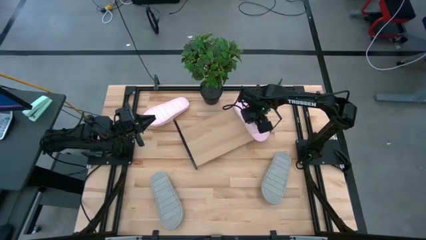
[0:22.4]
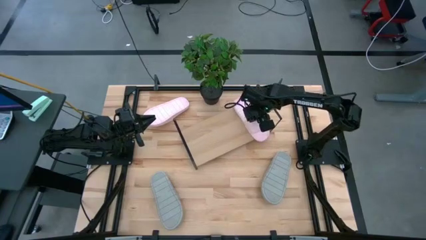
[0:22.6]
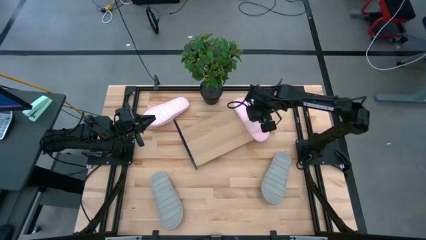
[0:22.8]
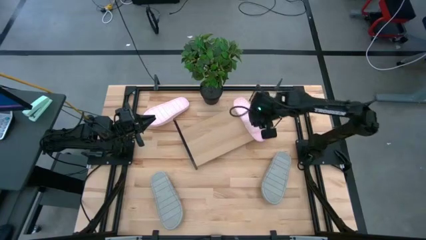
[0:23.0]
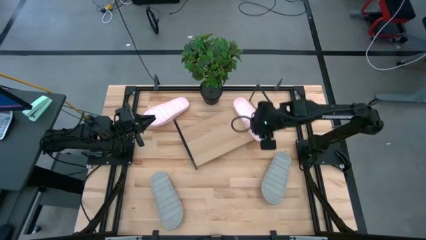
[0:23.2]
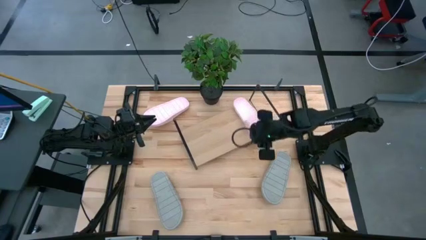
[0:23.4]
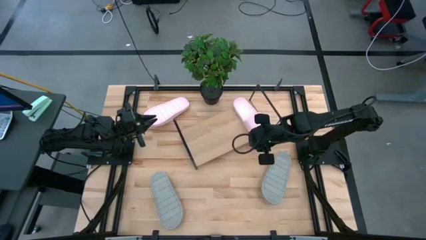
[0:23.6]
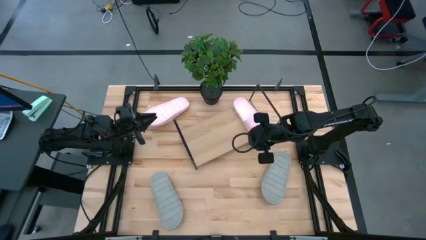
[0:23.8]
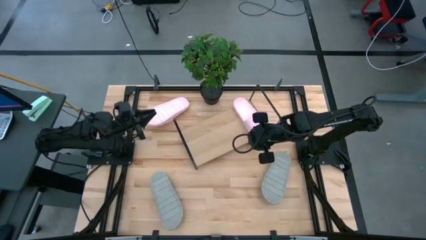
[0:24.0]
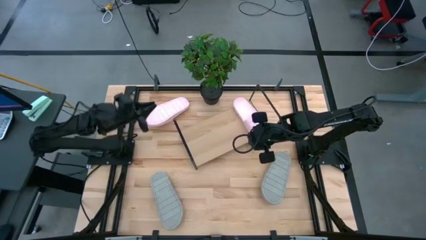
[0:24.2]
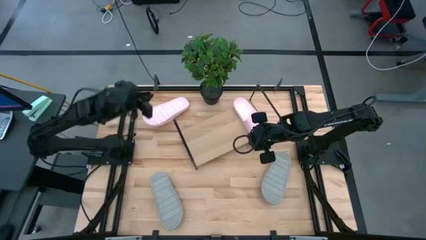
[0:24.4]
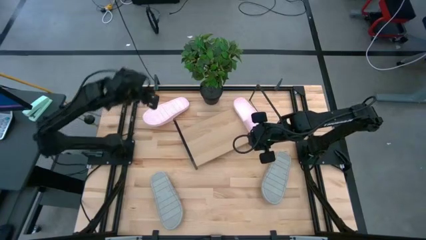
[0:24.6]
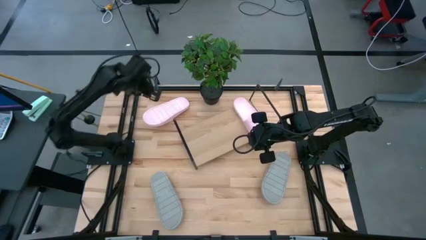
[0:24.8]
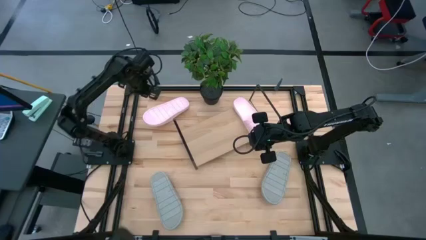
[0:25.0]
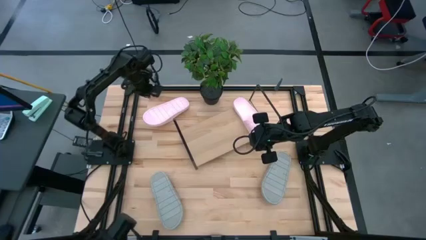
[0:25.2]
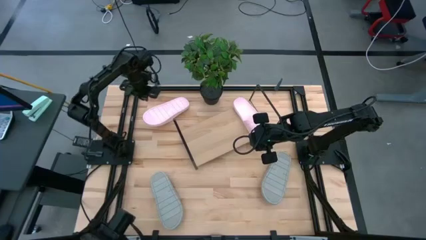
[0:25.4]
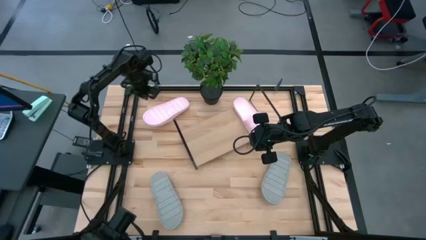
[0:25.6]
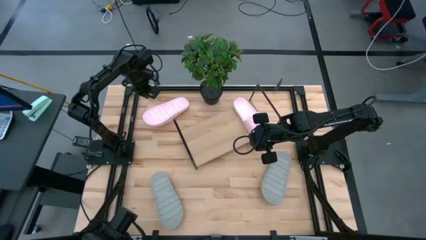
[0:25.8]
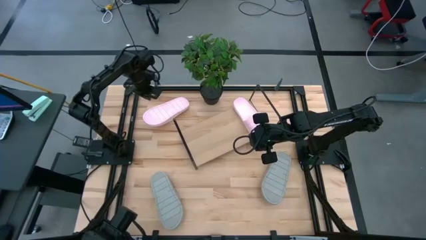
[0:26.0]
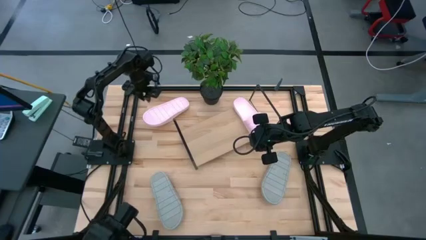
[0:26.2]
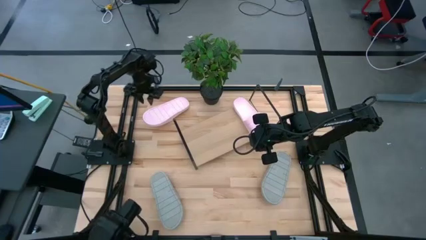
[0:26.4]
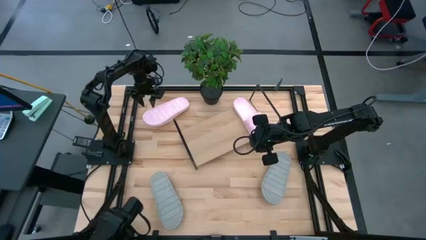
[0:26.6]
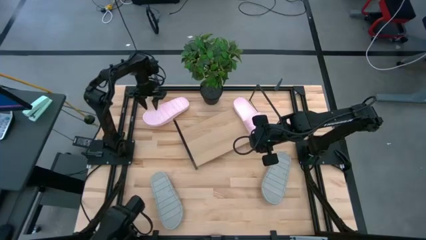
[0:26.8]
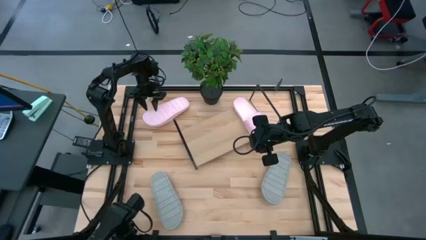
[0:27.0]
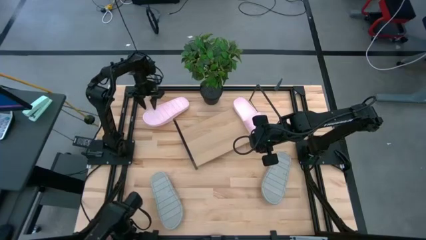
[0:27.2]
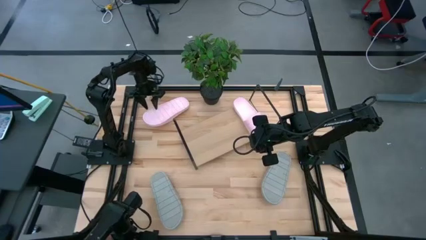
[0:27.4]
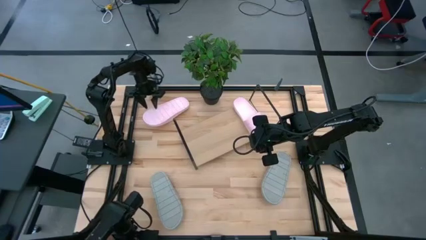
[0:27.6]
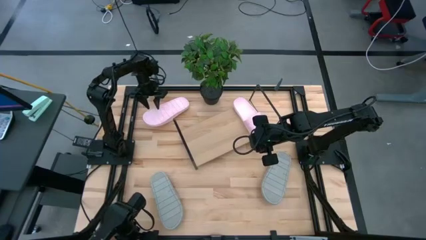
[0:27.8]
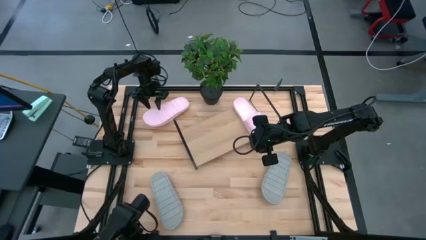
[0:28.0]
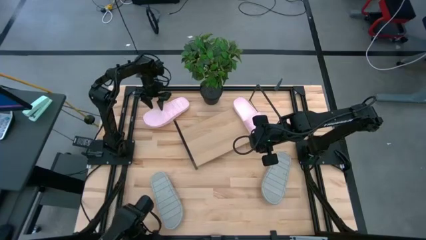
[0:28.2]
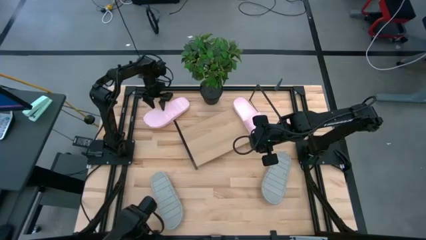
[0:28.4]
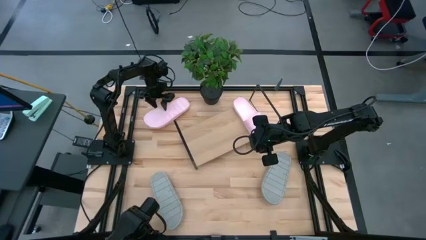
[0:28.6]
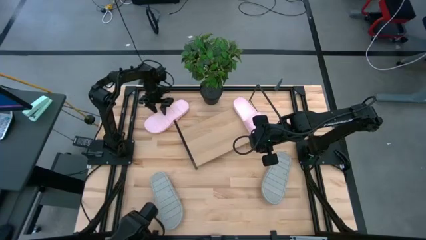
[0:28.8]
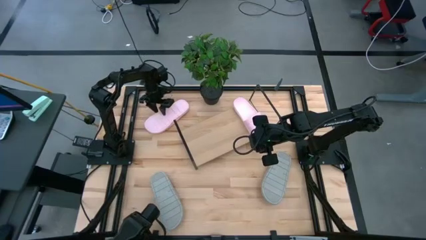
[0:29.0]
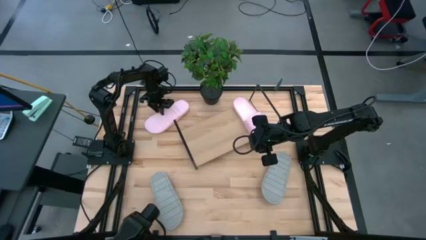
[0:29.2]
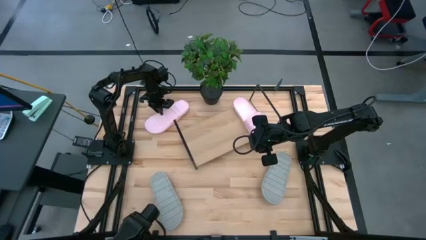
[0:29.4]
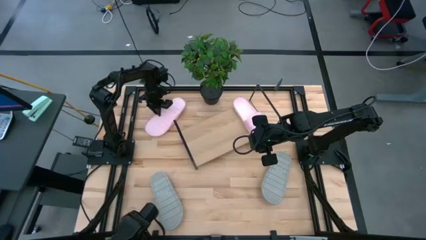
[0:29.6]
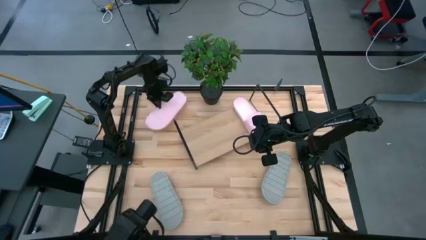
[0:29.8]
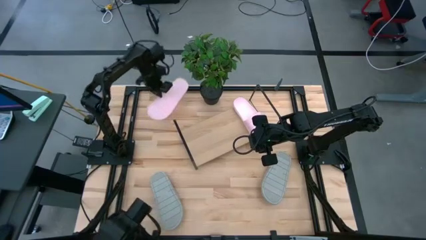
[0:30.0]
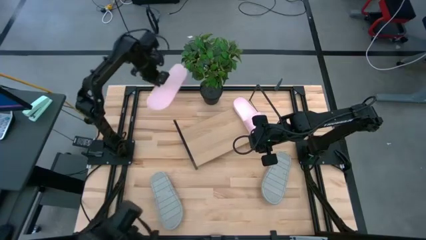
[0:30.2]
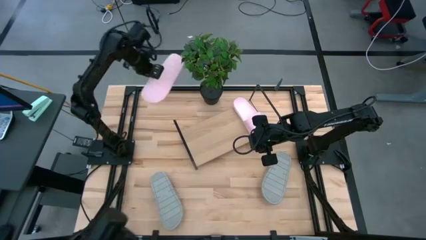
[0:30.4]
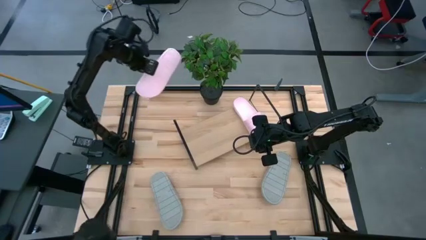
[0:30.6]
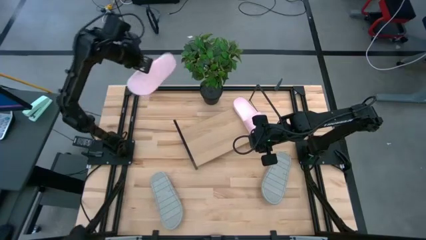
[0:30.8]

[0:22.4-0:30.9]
Task: Pick and place slides into the shelf
Put the pink slipper on the shelf

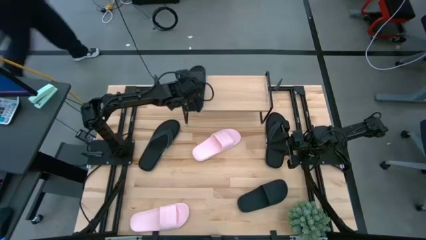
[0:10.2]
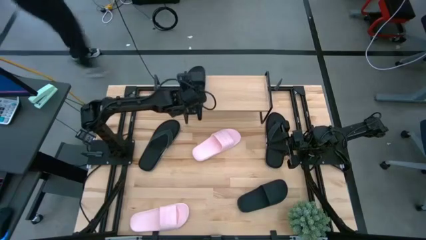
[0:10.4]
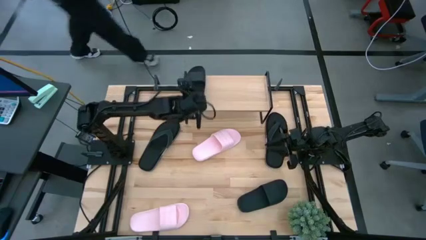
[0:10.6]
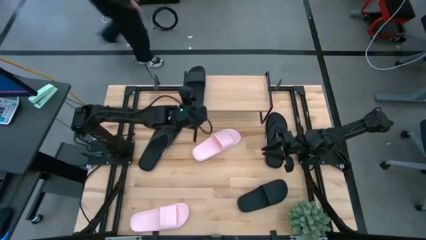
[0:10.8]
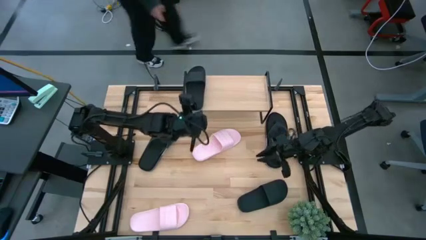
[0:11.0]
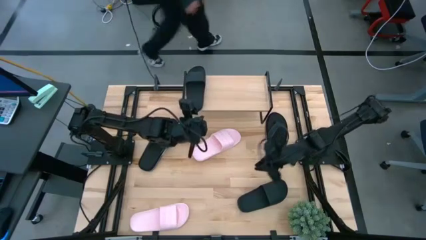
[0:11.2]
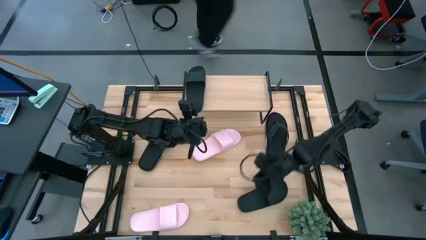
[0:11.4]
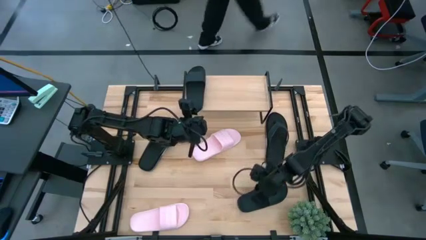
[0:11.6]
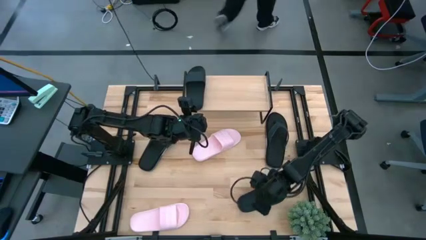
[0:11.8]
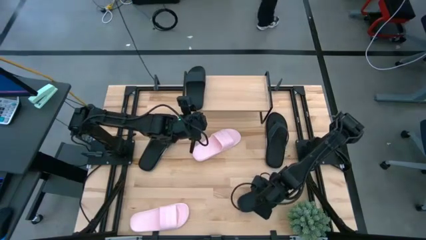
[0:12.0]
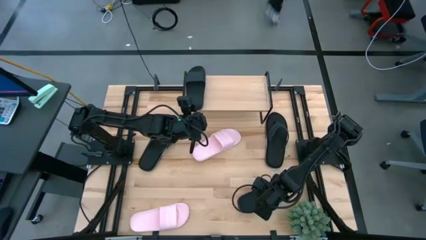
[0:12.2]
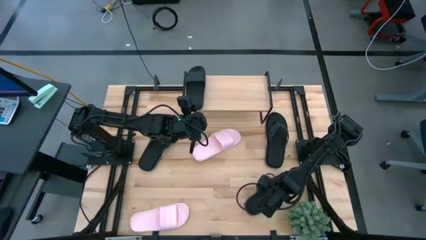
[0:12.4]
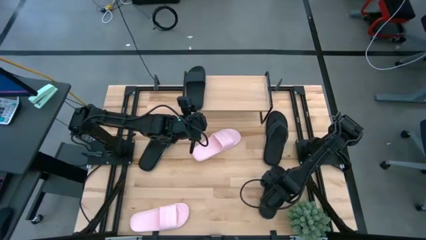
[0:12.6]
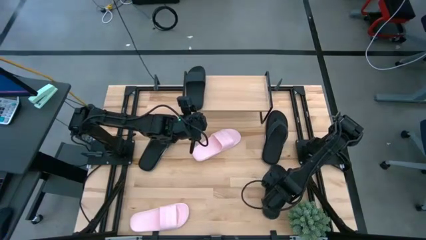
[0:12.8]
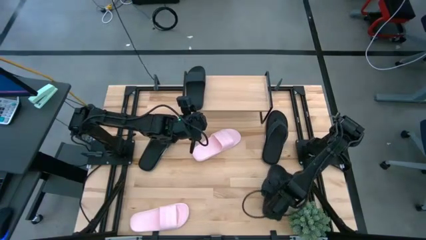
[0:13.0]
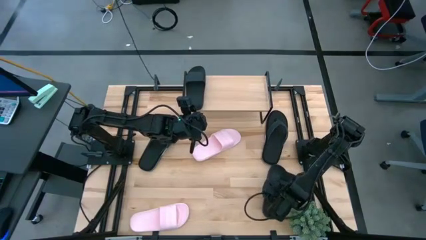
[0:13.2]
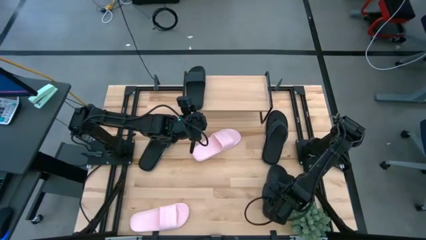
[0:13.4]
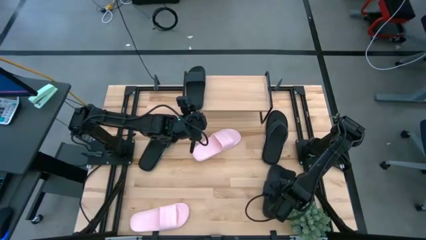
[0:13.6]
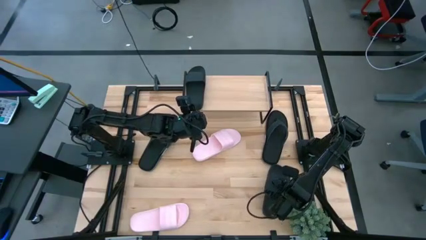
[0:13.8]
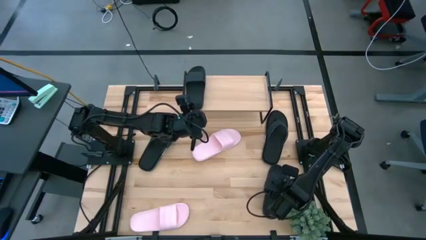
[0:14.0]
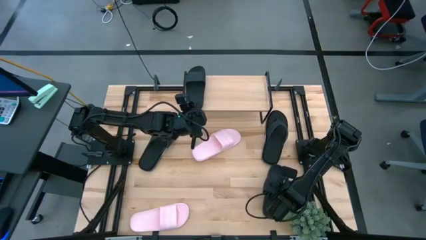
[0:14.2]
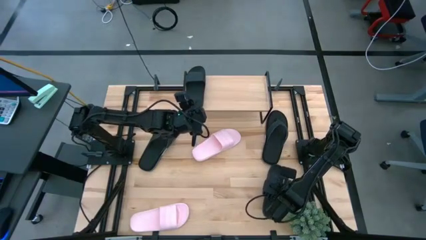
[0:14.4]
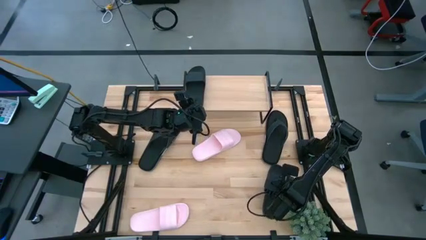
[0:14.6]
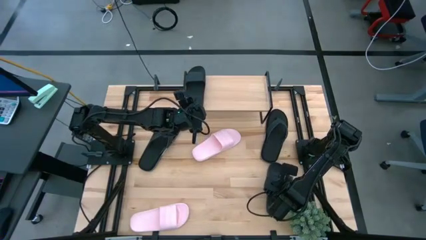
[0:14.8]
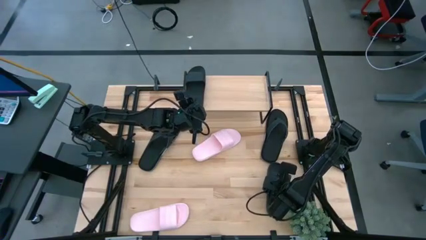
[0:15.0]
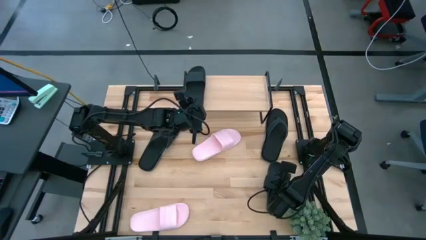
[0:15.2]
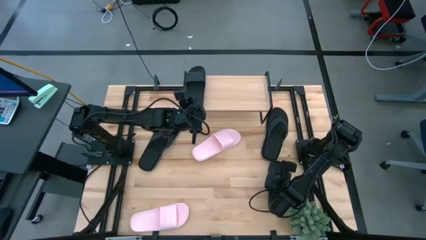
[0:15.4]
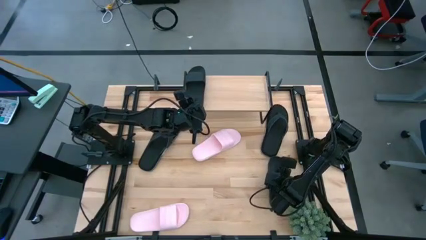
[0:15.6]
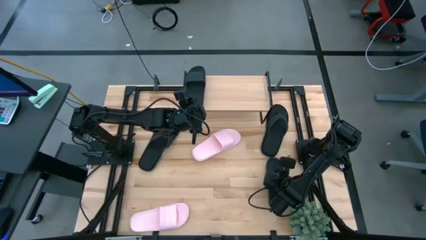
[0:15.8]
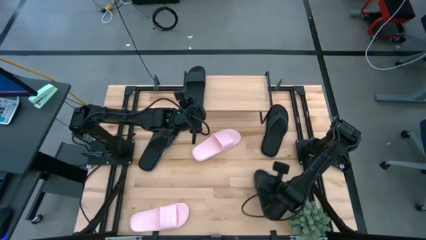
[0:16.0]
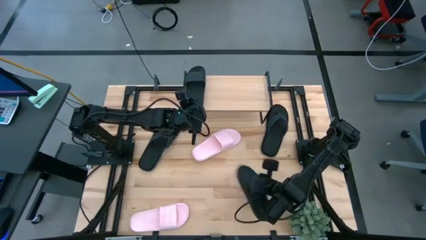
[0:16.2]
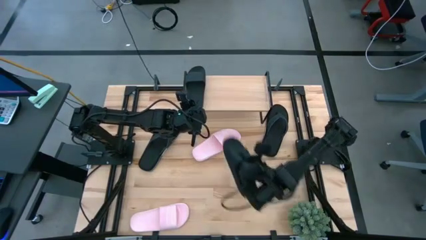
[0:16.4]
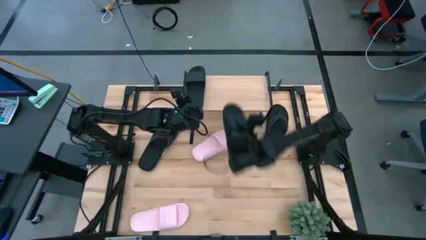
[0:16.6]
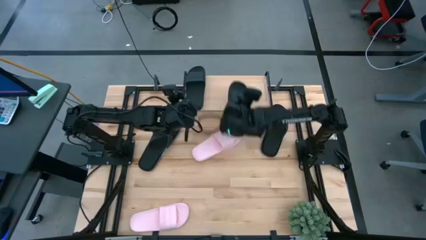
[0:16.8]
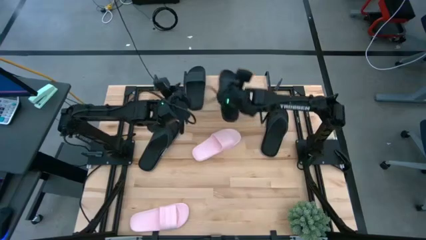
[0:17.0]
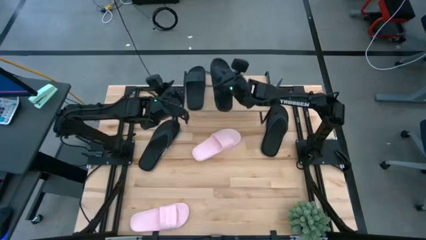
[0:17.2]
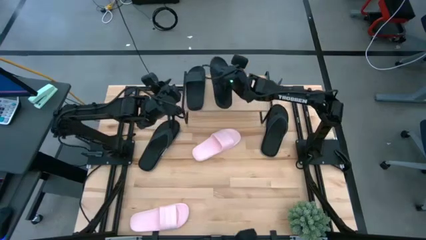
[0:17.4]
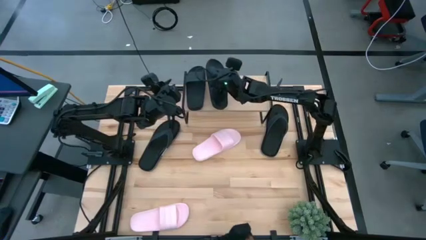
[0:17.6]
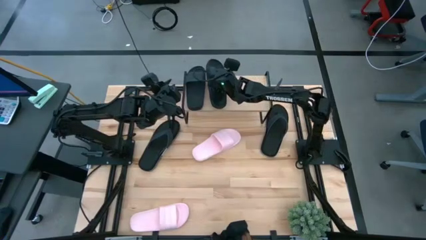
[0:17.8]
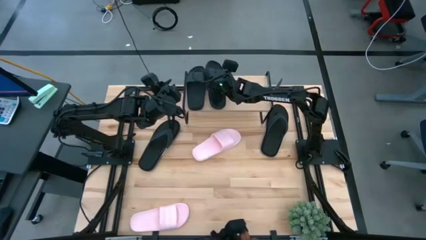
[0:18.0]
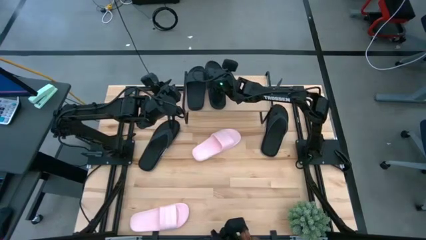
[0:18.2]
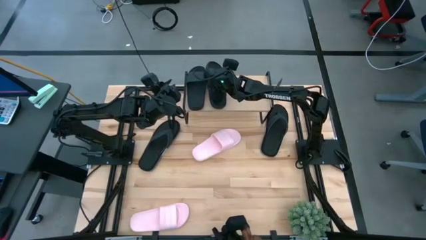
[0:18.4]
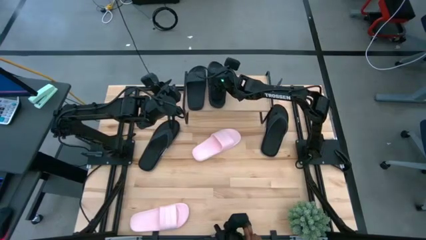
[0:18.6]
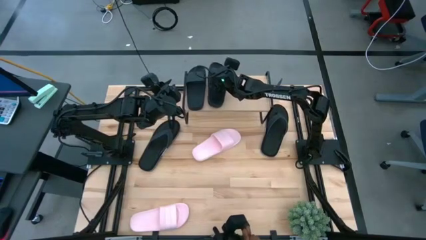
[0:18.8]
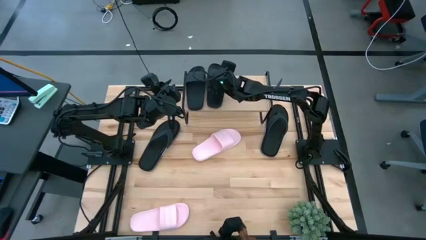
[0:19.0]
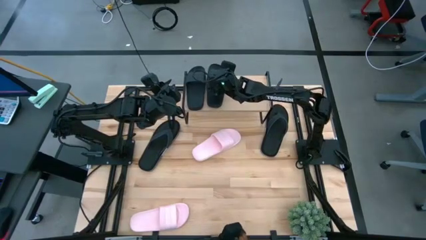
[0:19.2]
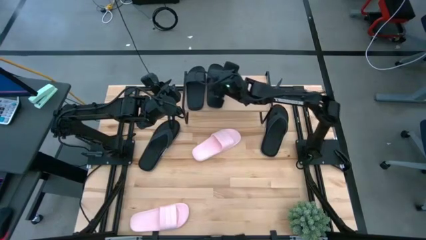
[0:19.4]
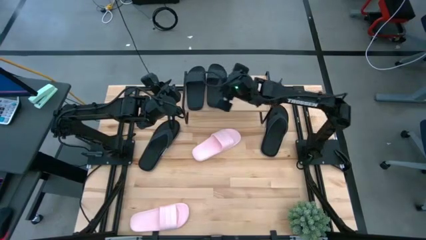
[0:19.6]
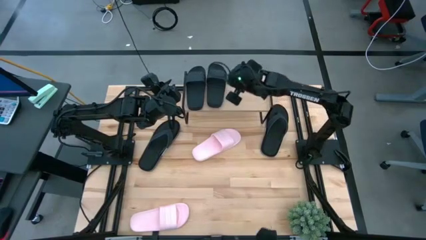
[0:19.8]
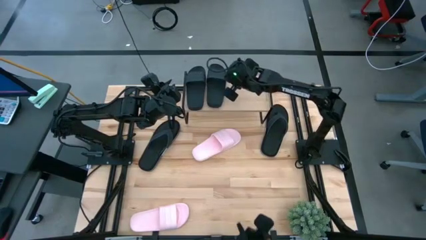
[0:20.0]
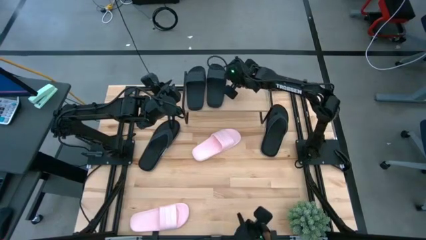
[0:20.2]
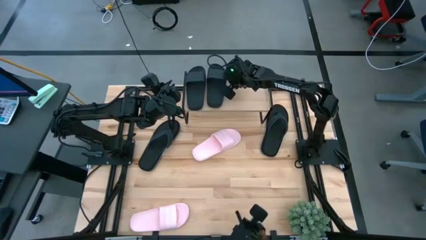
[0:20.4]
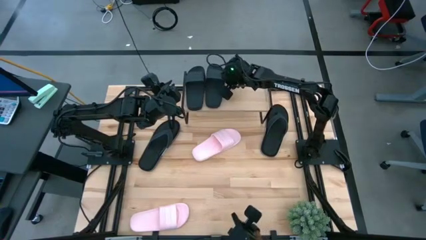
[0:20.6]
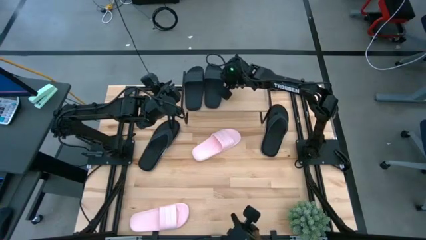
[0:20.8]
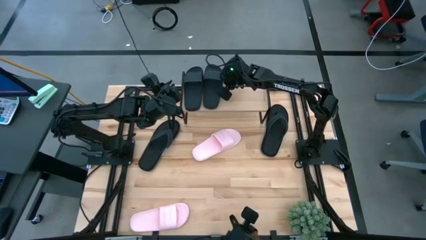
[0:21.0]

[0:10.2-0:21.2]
Task: Pick and place slides into the shelf
Put the black slide on the shelf
